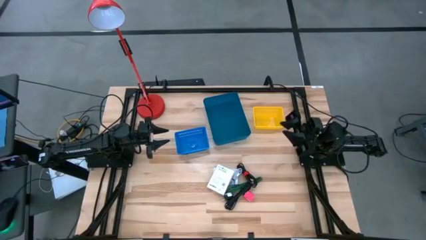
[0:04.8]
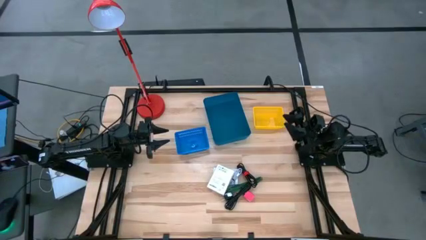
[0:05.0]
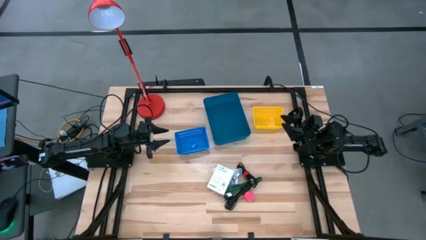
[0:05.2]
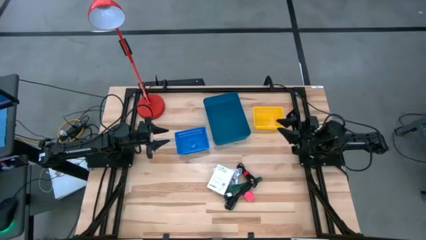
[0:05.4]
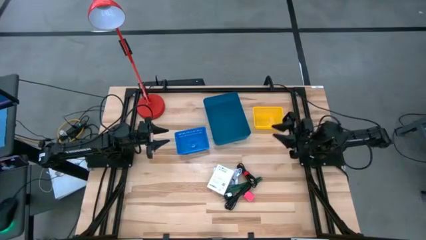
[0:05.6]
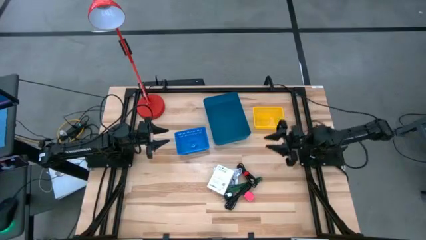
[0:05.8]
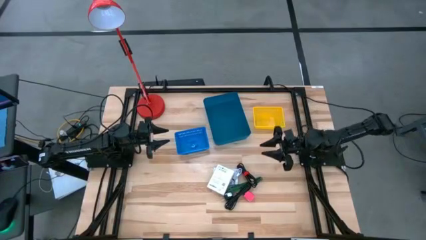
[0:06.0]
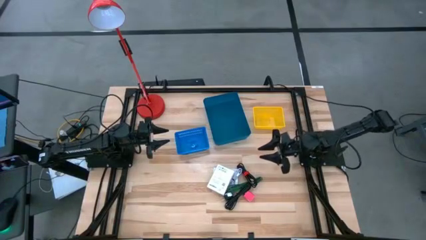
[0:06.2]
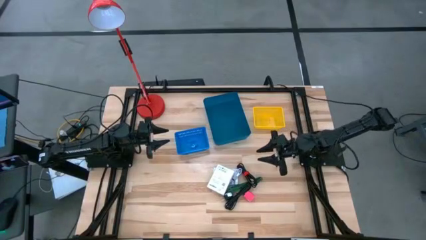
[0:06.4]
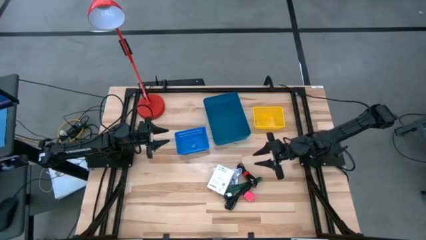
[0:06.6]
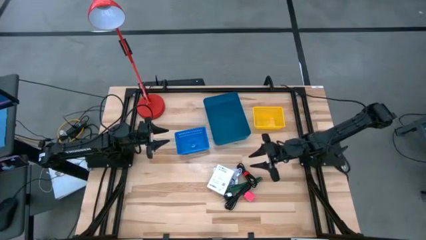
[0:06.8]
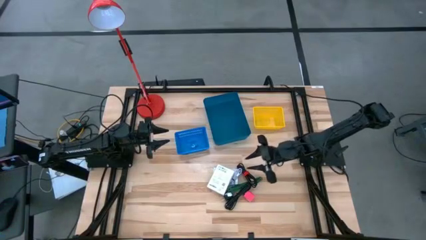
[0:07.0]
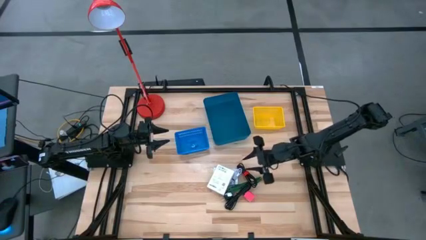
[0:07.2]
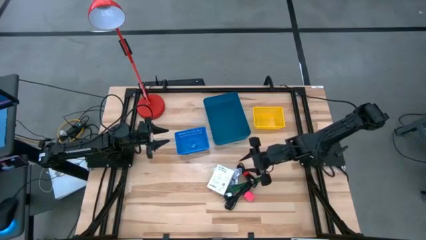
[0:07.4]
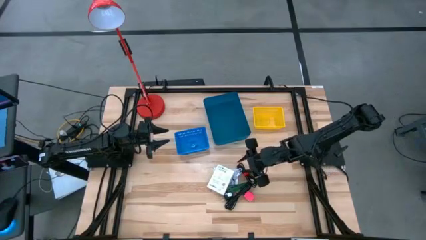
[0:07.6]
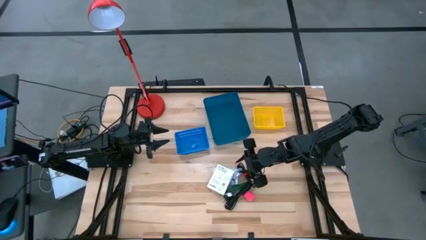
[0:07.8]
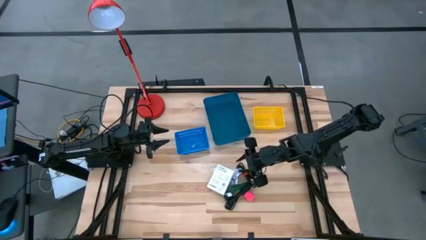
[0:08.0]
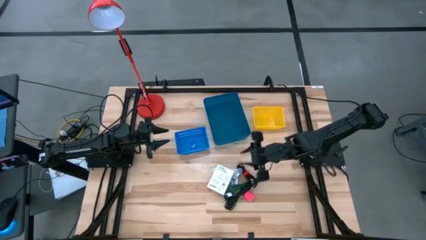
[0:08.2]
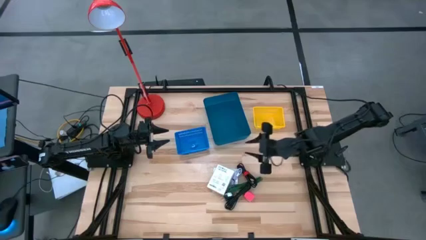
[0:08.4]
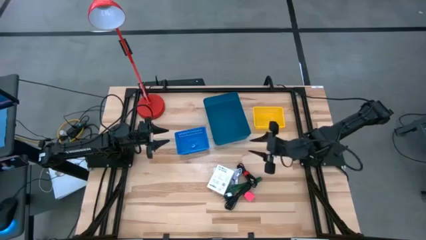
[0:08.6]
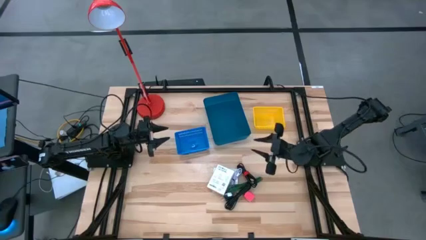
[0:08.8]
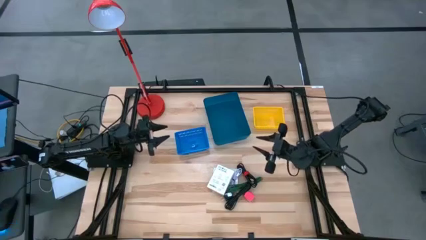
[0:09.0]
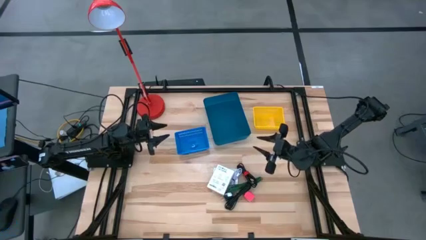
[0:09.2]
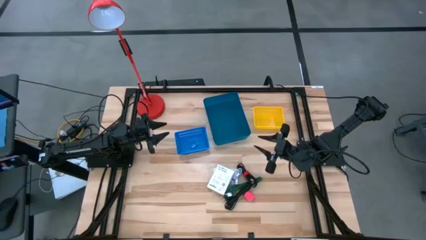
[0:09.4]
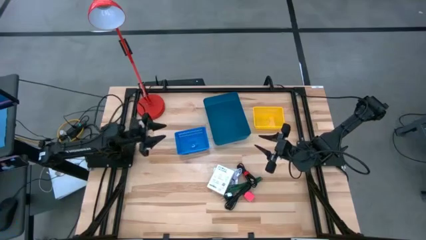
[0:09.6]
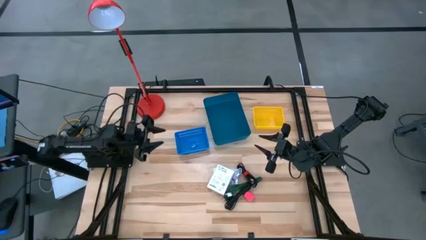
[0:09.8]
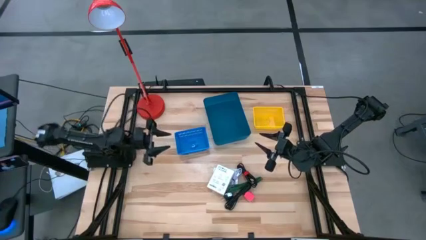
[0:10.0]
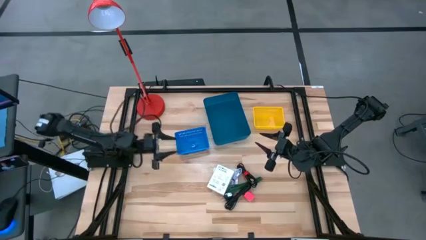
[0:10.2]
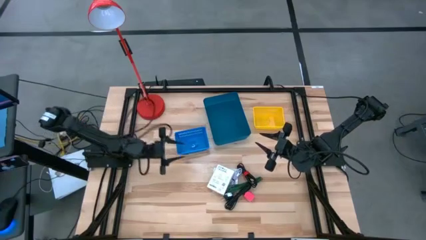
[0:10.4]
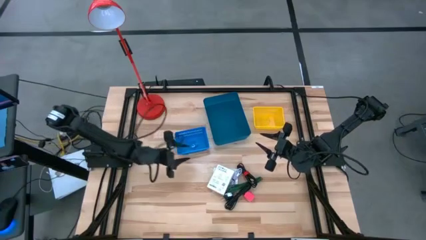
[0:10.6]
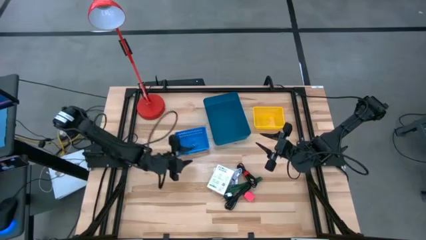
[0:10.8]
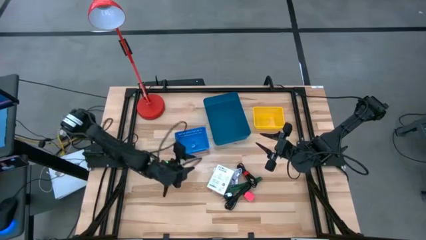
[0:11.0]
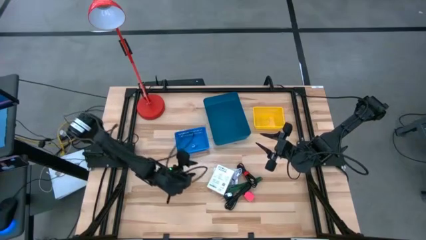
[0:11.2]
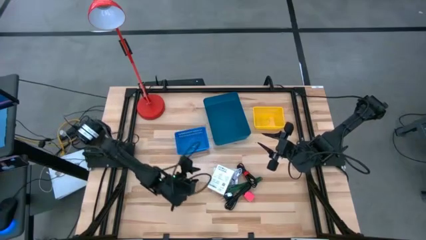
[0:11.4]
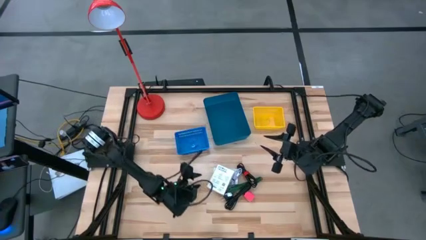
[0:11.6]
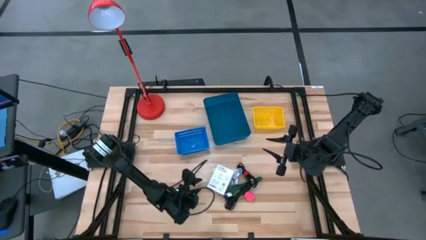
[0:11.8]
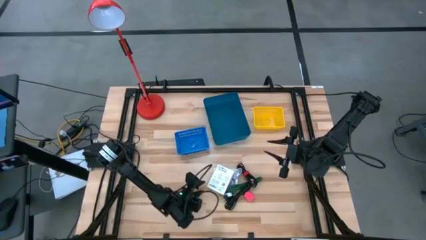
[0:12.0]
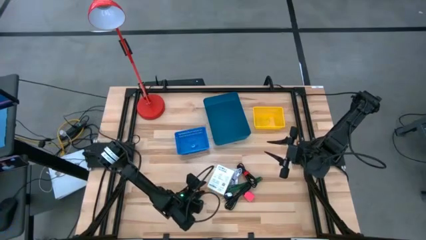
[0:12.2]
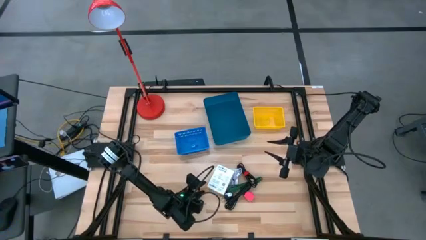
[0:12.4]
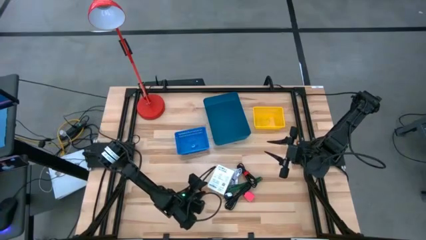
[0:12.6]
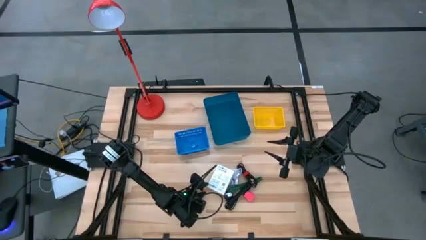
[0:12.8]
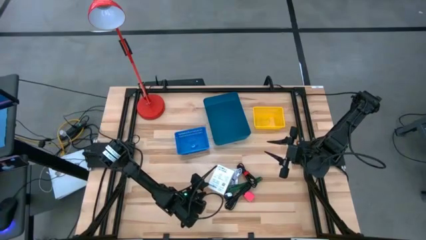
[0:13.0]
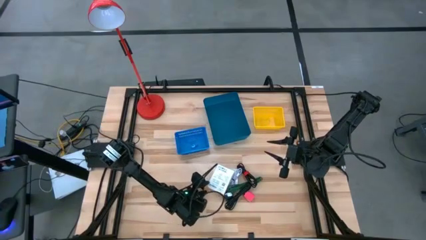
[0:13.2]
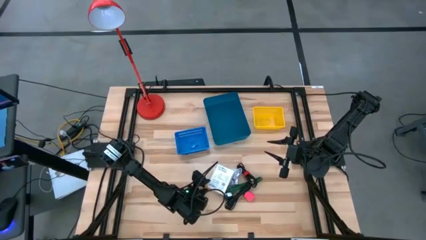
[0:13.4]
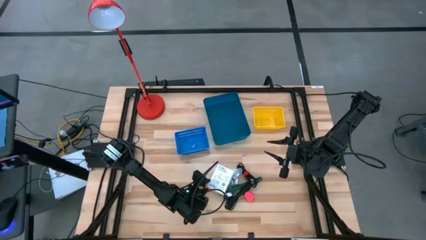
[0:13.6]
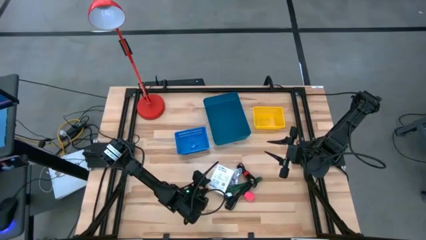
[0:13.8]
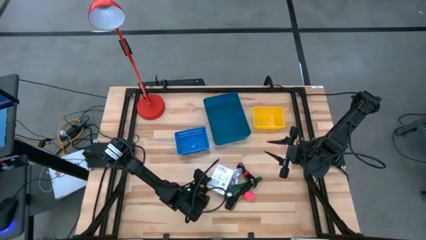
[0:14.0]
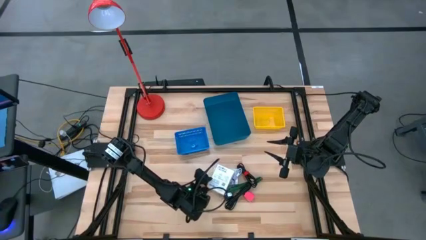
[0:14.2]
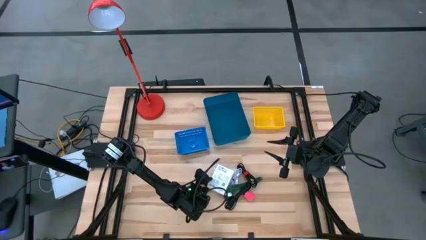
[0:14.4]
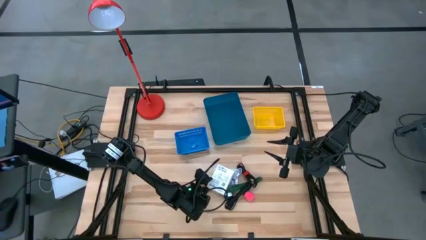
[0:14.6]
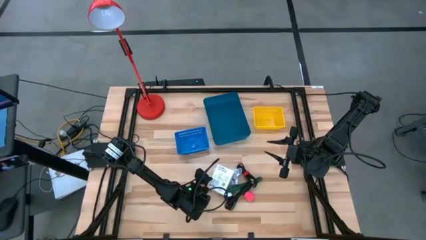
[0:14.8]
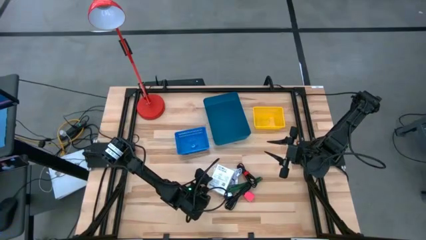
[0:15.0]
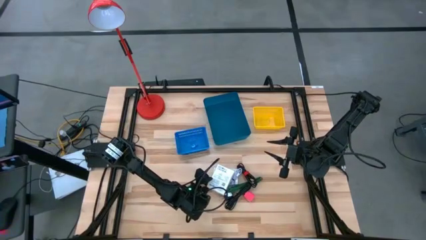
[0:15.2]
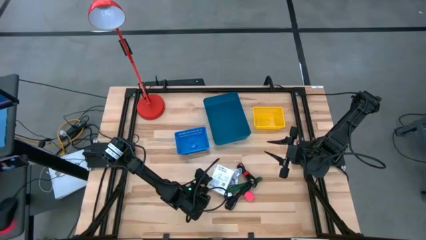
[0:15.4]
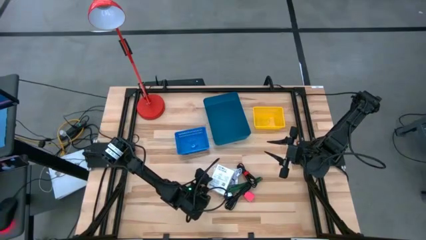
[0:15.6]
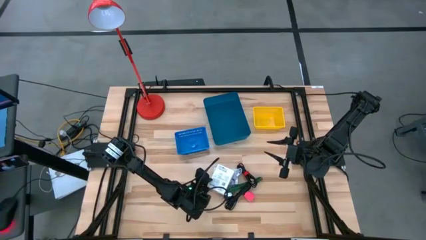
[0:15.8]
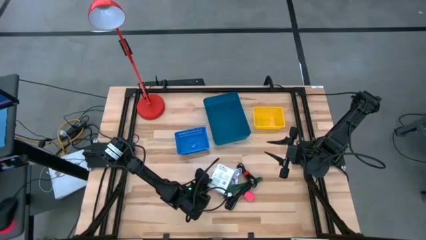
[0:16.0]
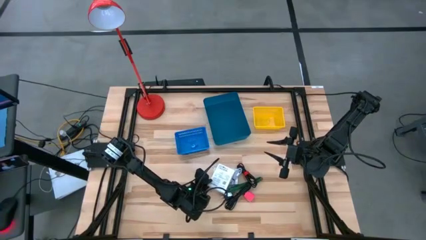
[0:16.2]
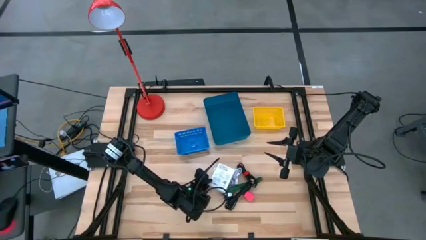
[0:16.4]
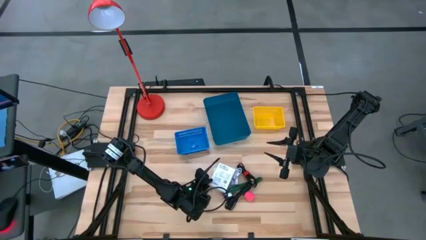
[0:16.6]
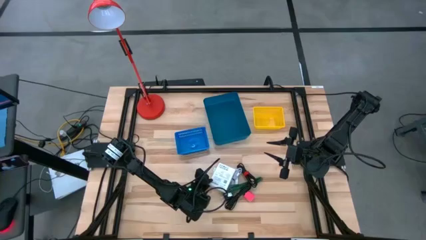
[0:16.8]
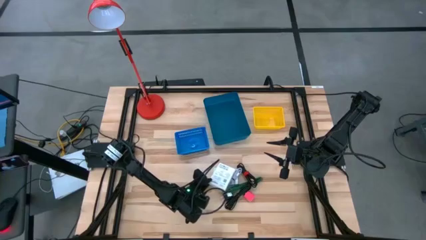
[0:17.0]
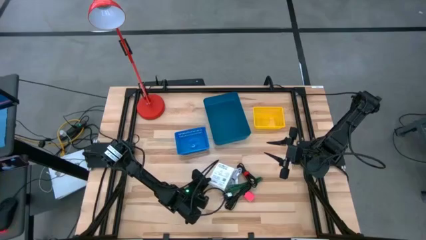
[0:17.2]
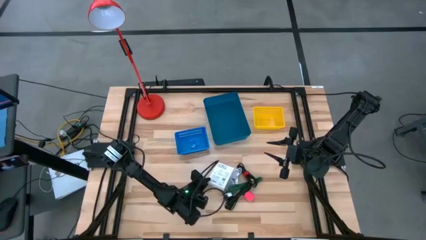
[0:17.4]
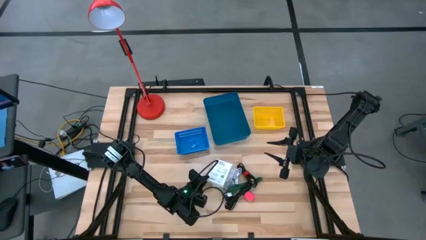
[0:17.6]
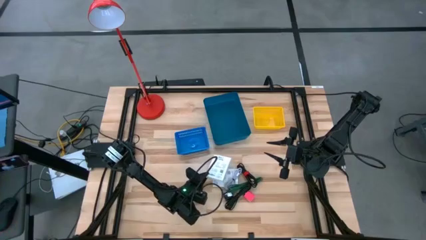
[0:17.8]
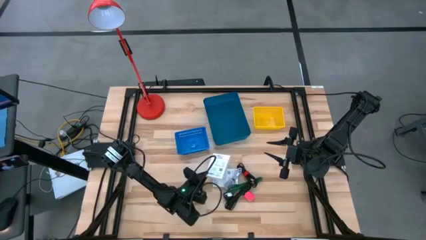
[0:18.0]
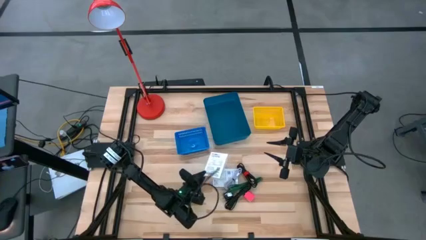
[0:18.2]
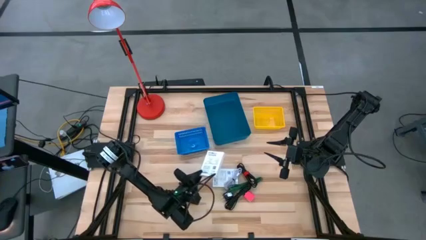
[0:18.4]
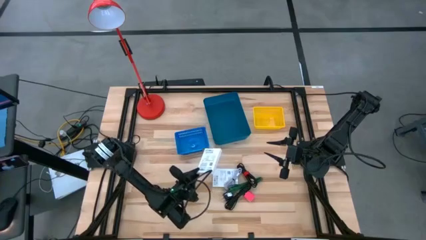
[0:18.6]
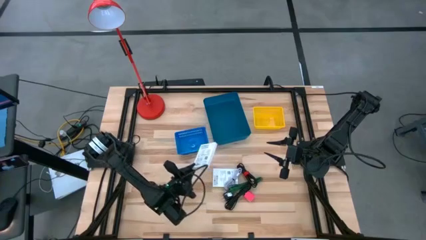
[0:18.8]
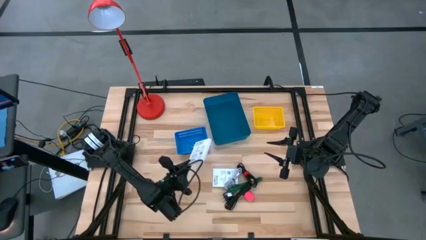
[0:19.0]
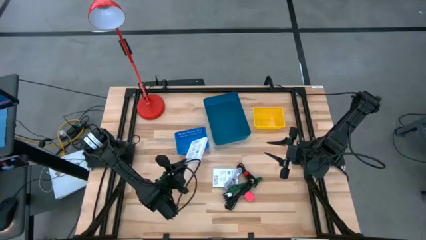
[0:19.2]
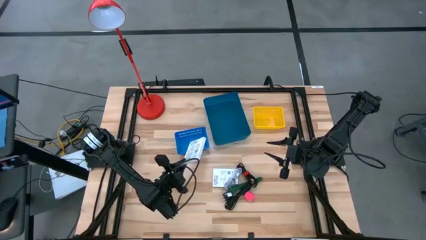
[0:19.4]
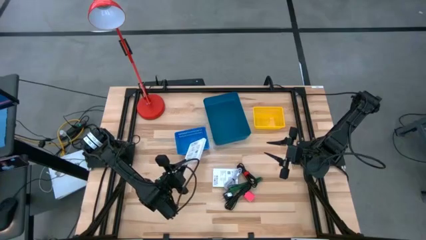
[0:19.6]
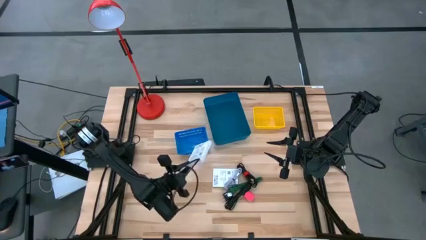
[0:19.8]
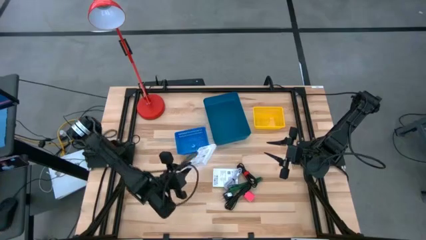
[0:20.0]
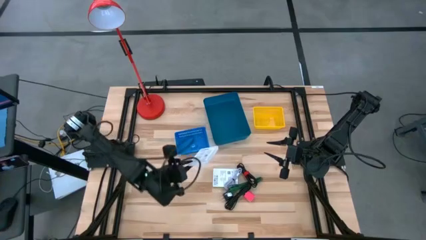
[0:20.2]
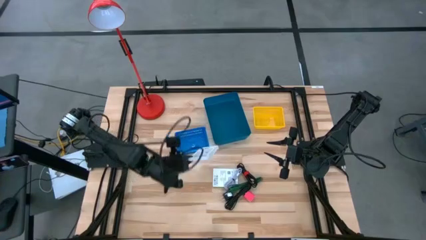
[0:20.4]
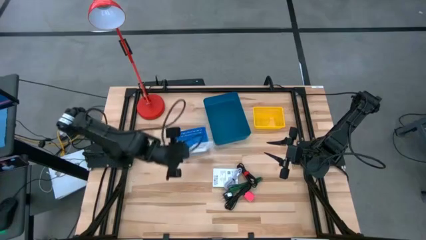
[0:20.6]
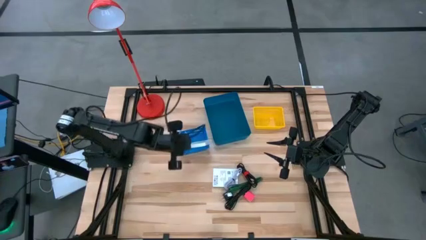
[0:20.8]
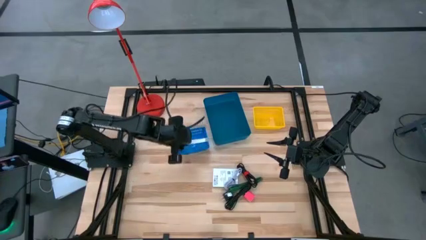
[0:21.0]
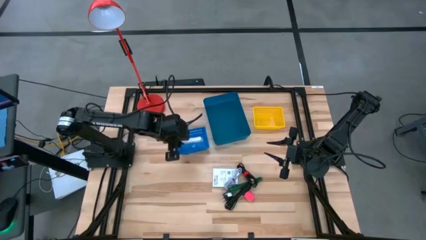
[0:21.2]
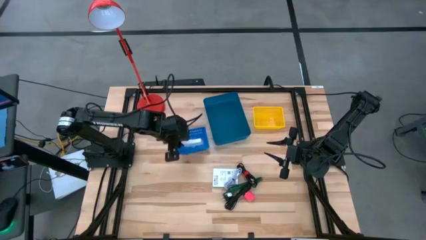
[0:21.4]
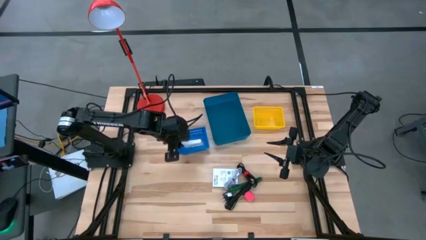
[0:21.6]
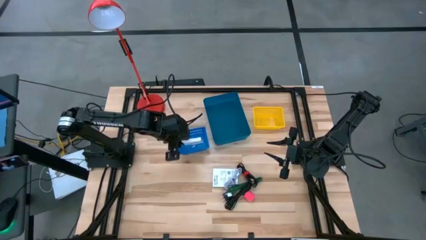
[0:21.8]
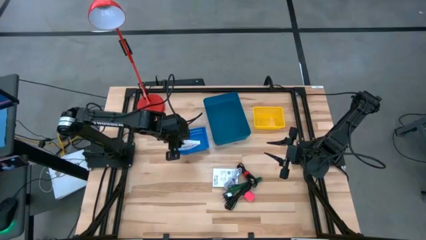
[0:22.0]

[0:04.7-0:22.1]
Task: Pick and place items into bin
Put the white card reader box into the blue basket
